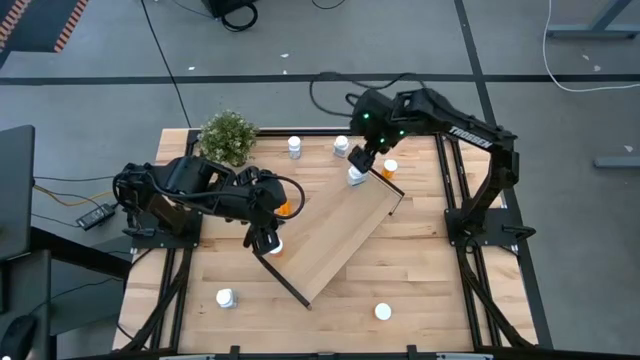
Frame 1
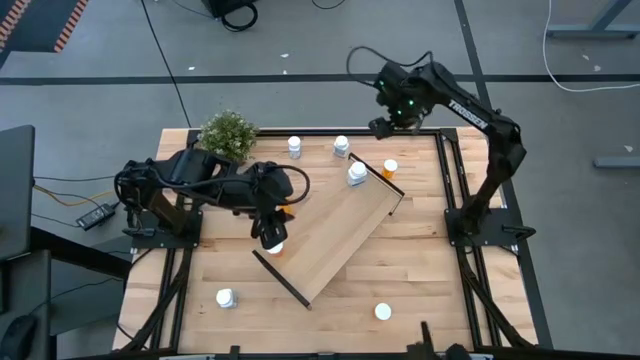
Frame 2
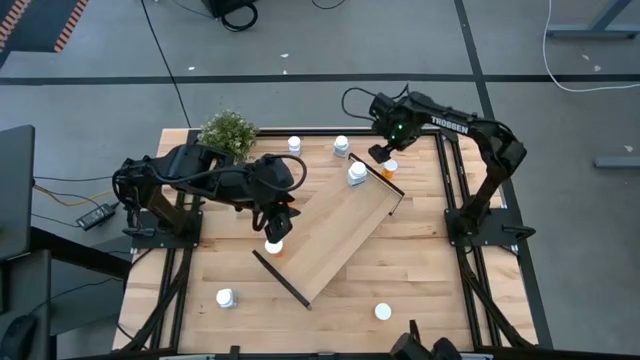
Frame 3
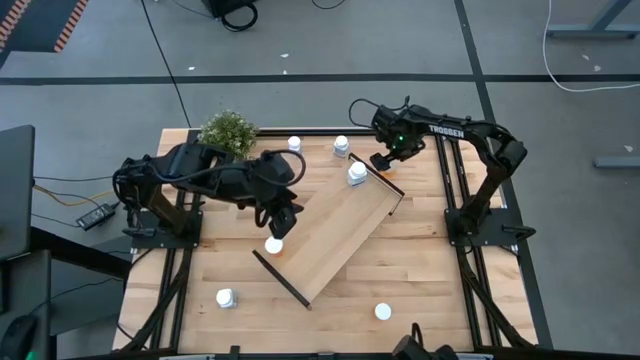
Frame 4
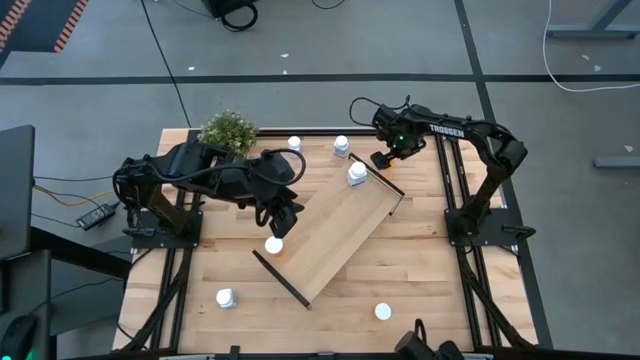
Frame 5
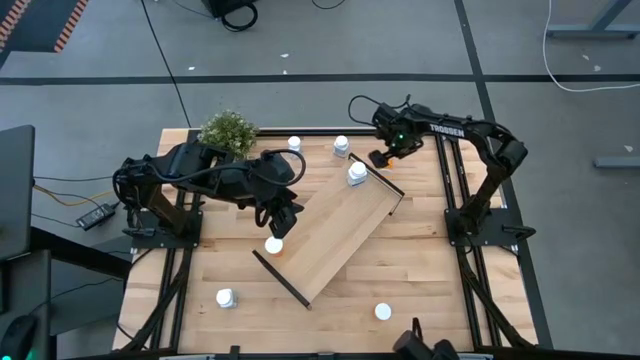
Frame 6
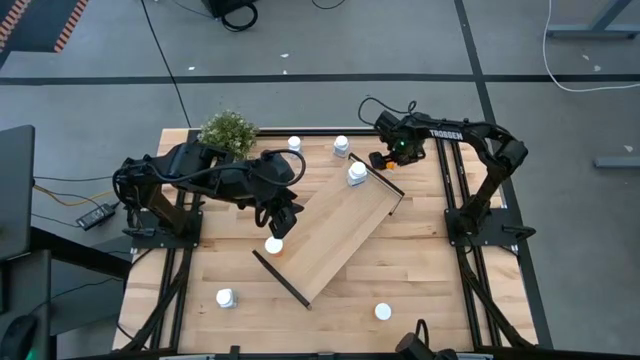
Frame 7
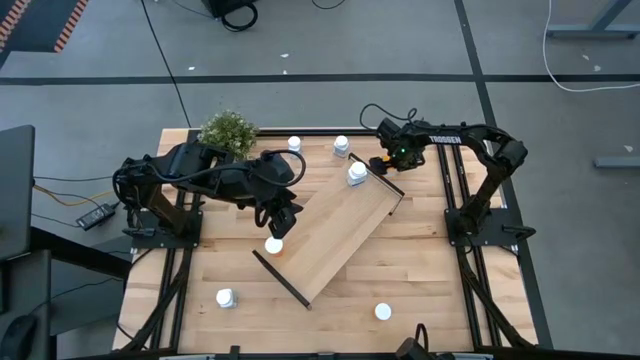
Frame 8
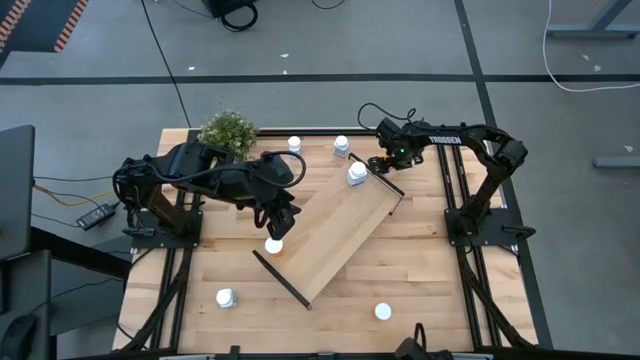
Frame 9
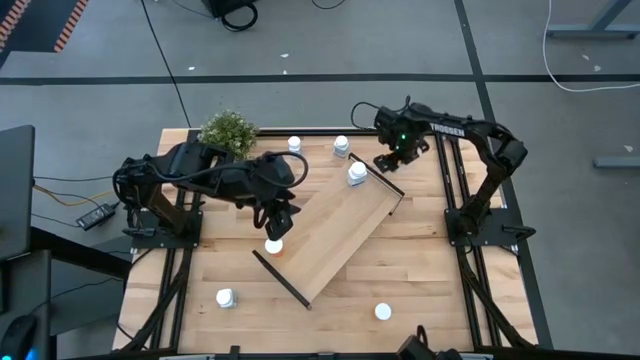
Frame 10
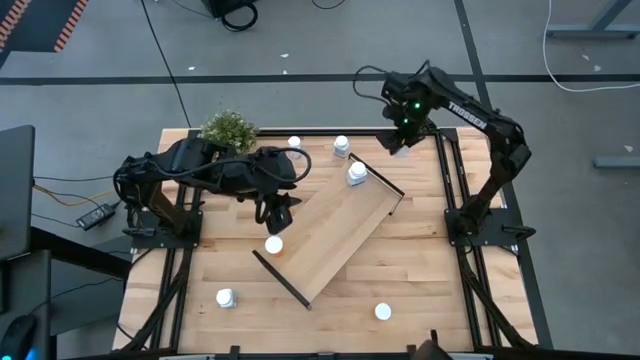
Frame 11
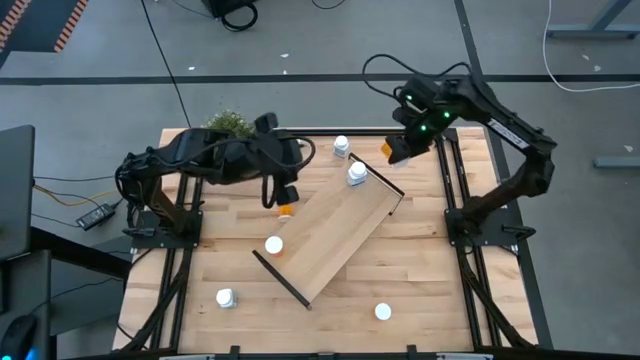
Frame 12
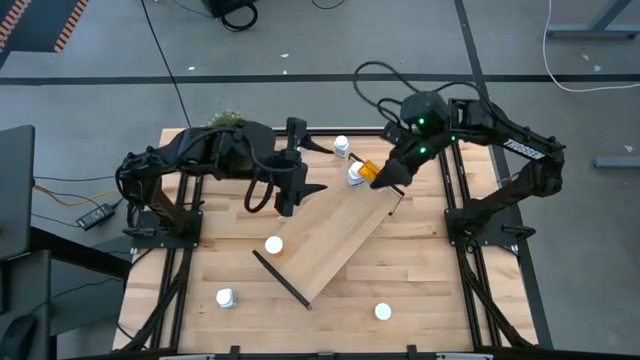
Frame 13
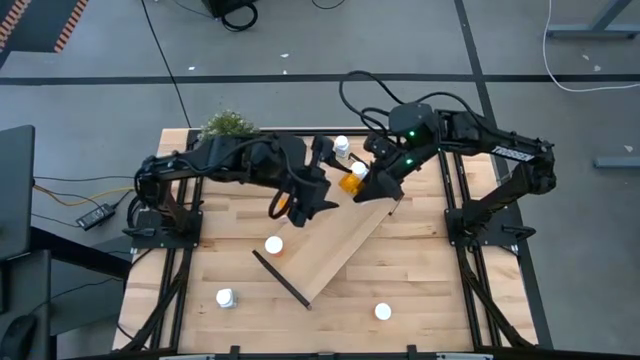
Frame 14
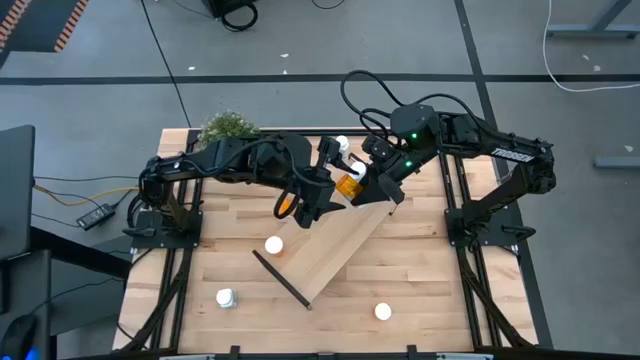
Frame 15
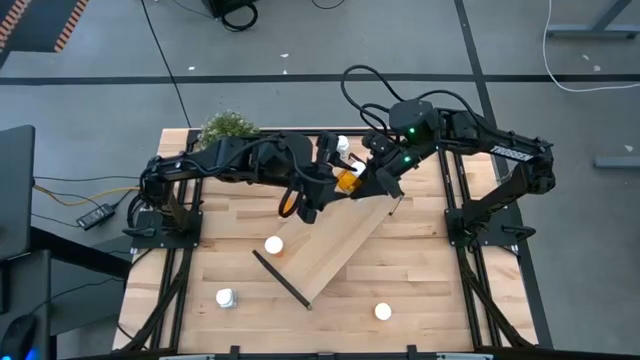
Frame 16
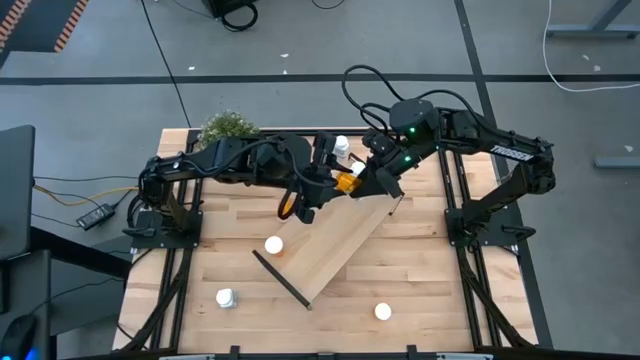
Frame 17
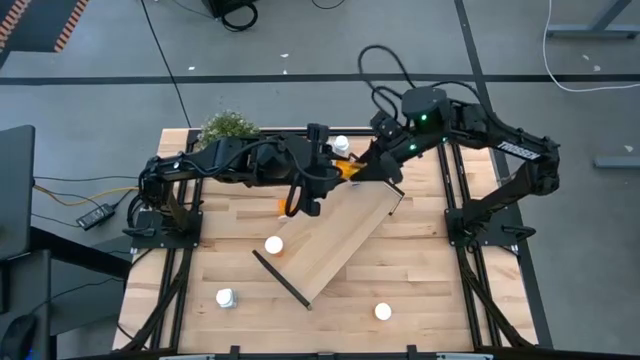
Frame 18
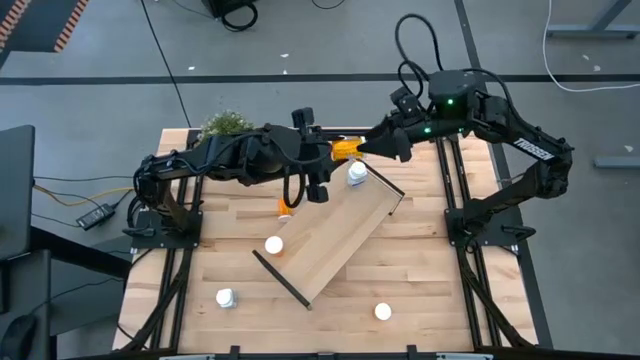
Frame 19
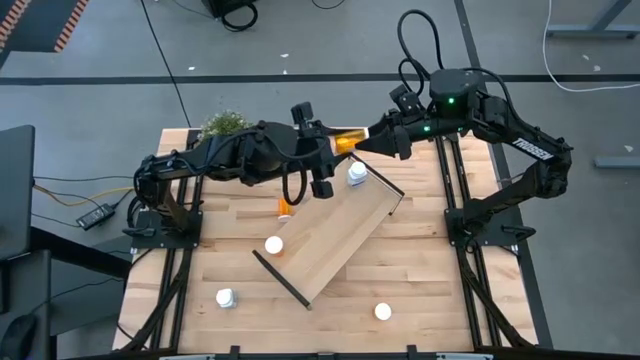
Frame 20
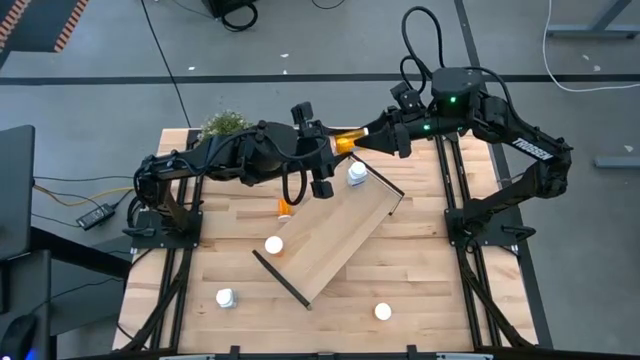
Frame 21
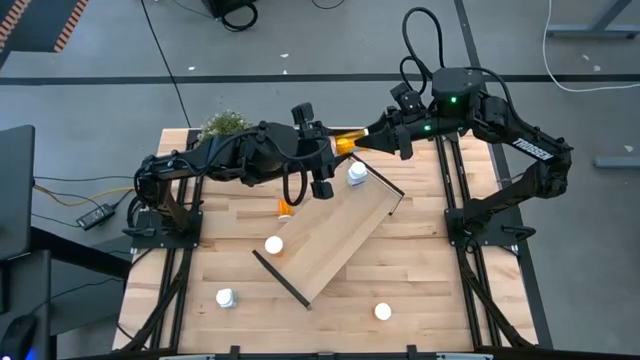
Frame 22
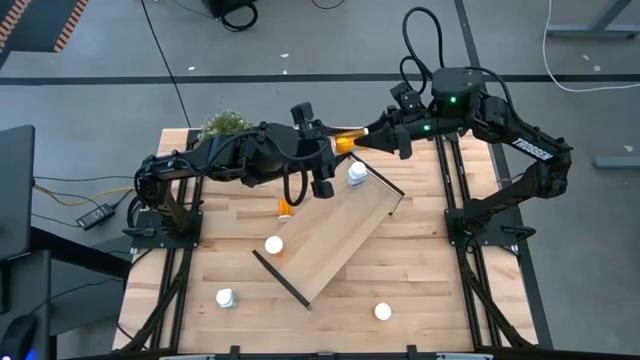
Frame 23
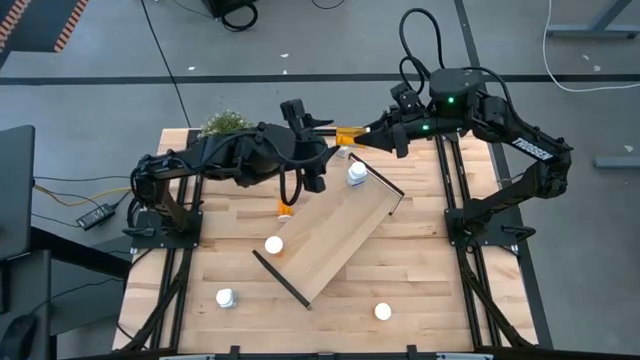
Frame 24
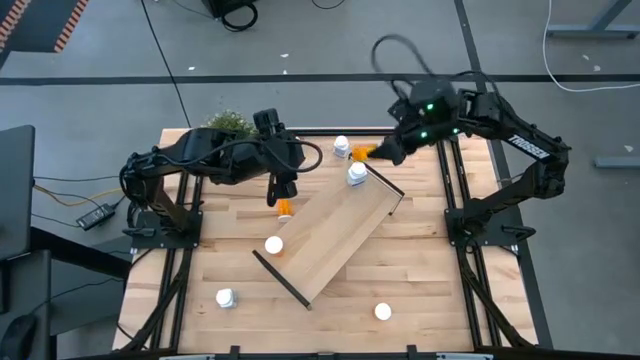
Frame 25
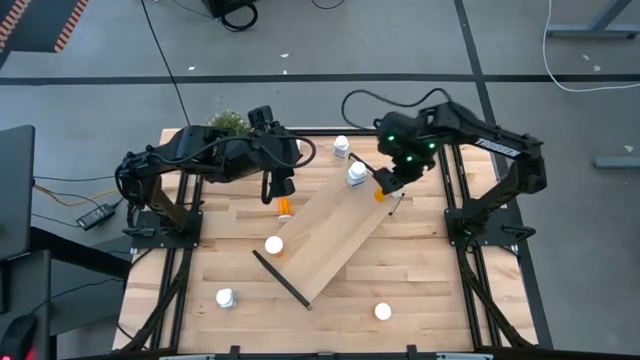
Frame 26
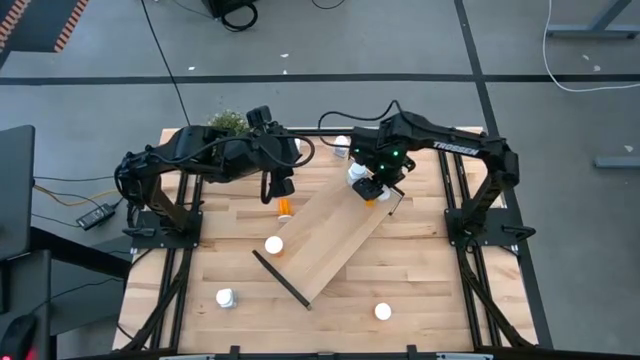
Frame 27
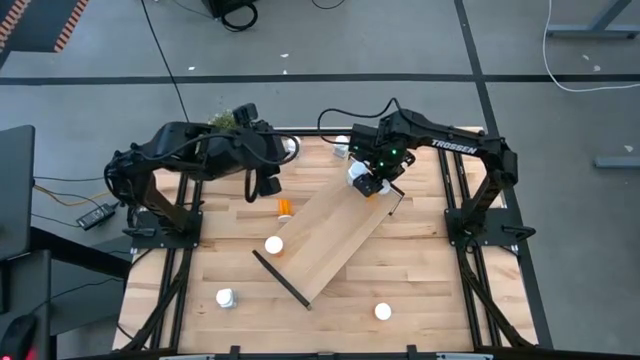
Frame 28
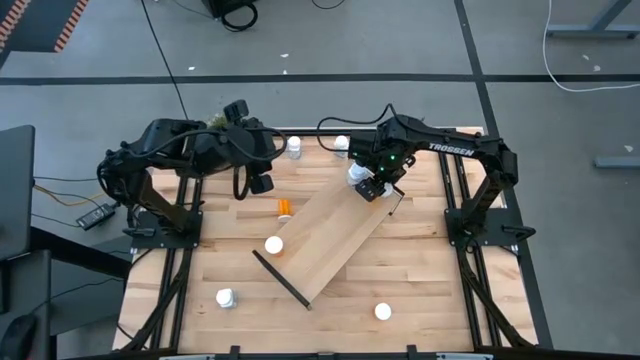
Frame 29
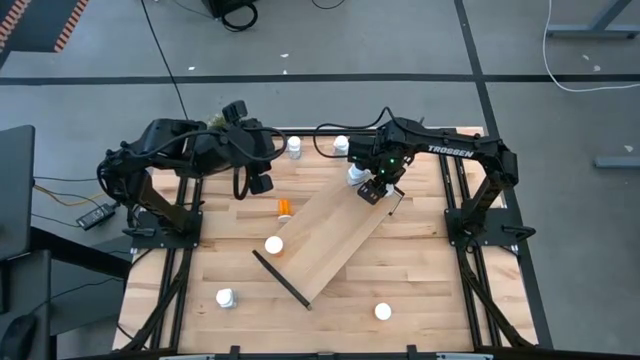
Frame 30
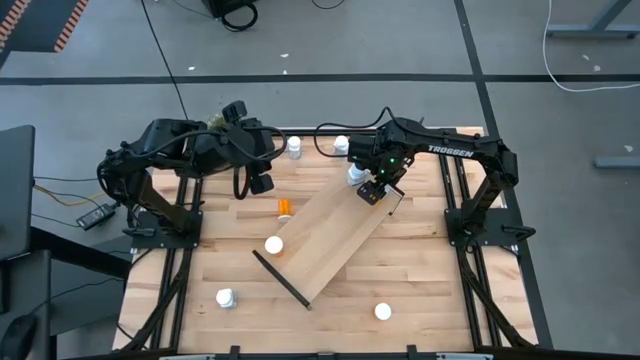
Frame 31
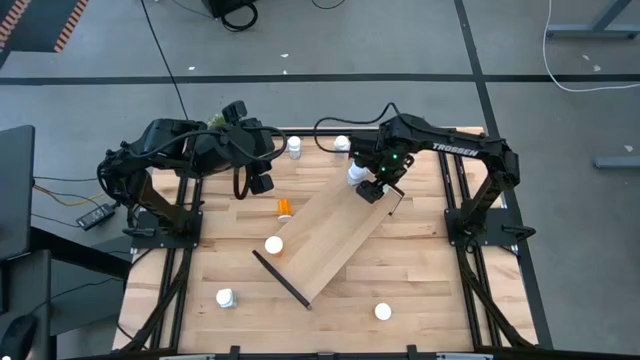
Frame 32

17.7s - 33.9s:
Task: Pick and place medicine bottles onto shelf by color
Put the right orange pill bottle on the shelf

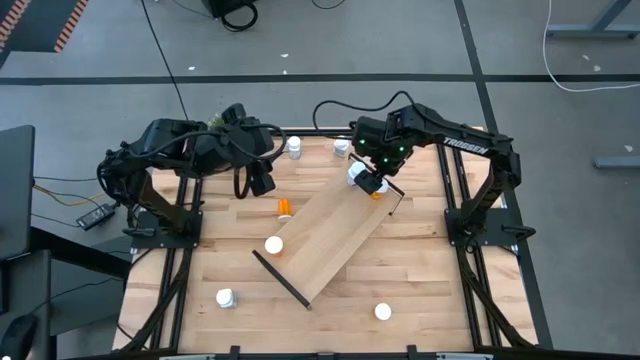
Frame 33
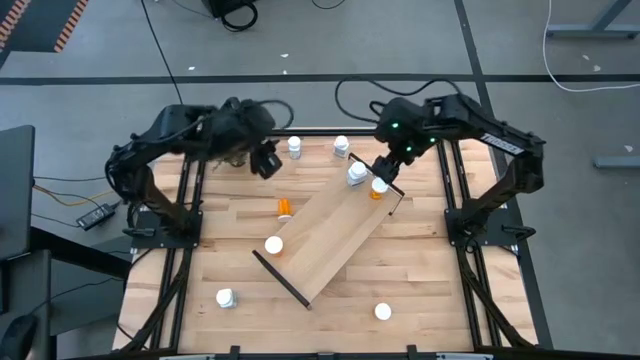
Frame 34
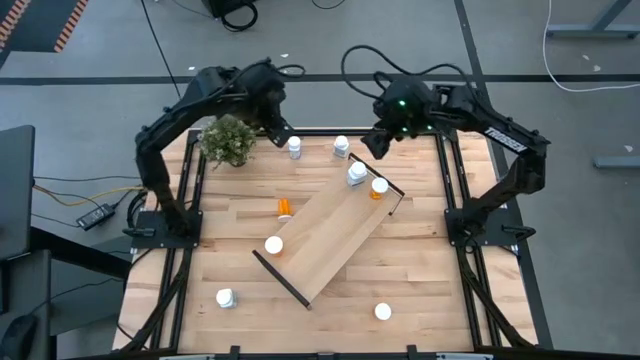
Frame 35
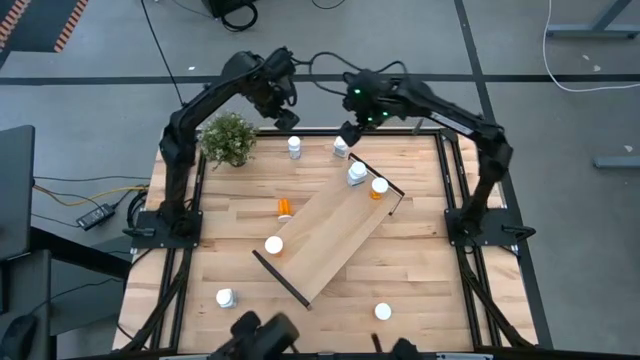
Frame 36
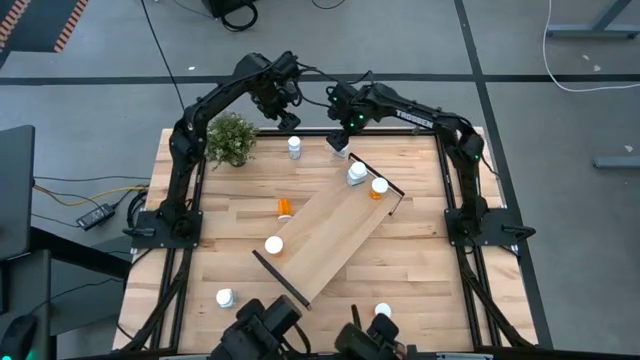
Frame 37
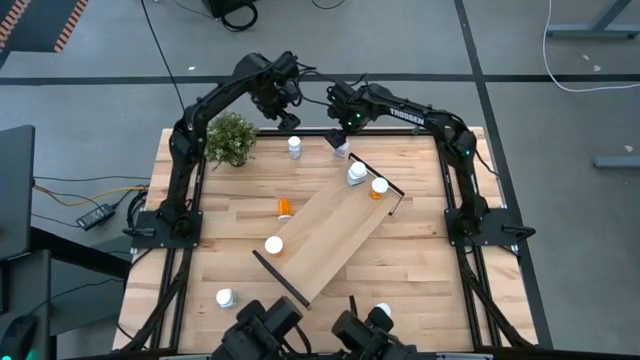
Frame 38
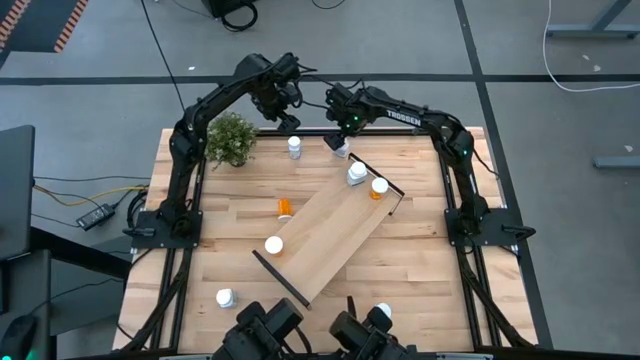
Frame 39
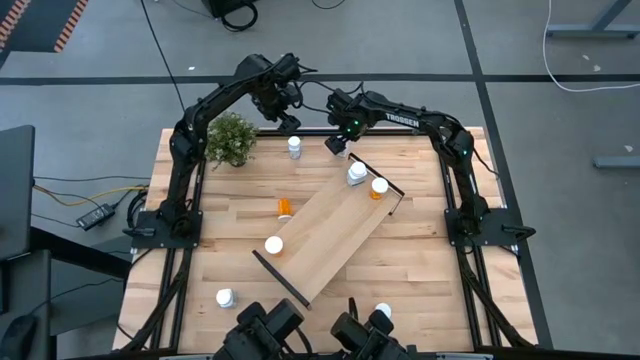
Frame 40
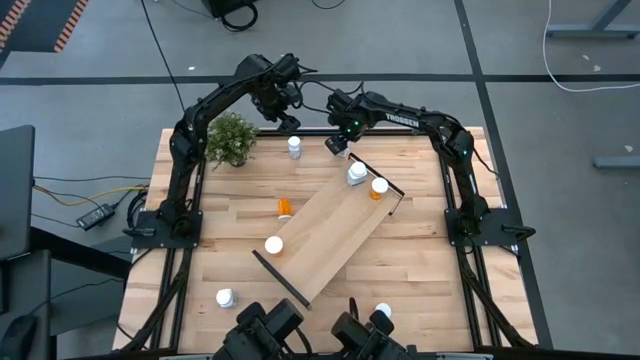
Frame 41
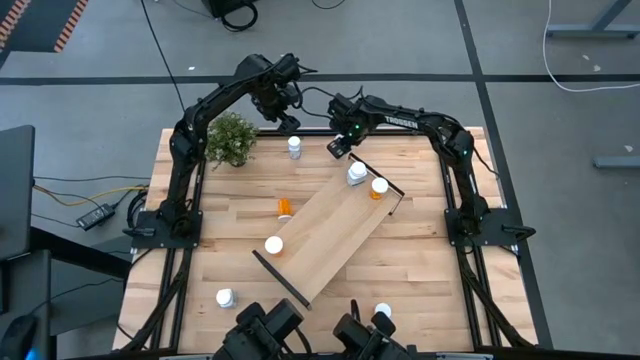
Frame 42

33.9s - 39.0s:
Put the top right white pill bottle on the shelf
